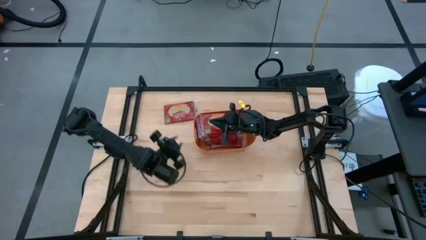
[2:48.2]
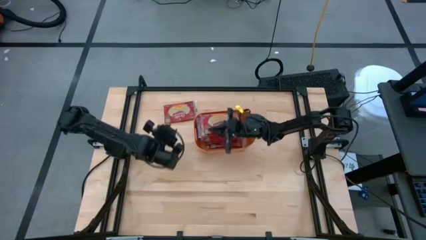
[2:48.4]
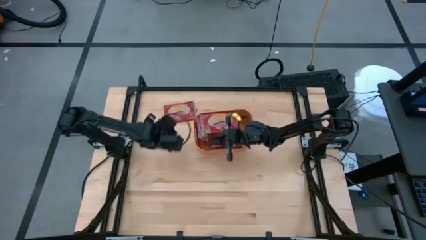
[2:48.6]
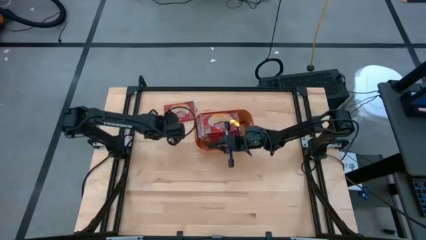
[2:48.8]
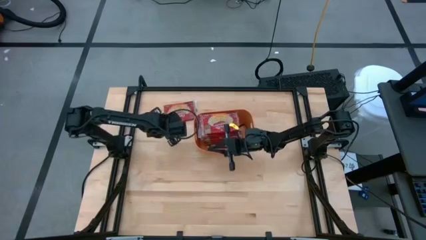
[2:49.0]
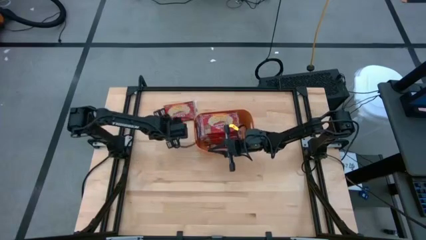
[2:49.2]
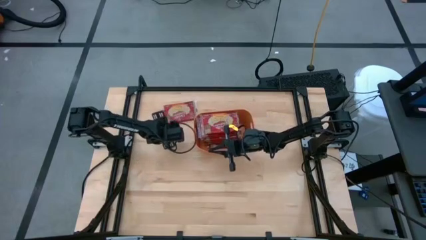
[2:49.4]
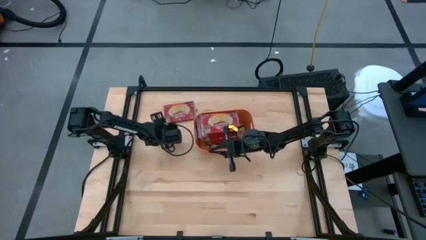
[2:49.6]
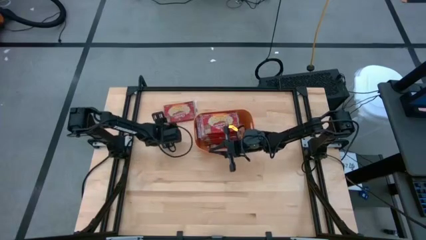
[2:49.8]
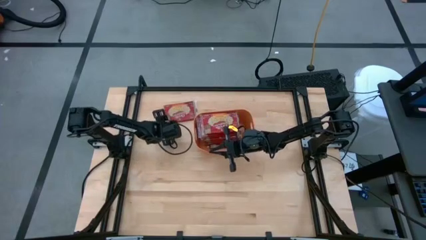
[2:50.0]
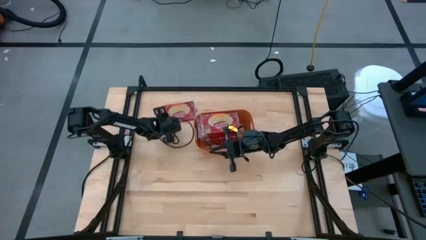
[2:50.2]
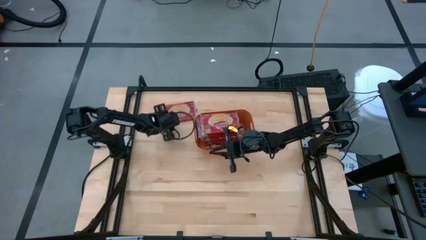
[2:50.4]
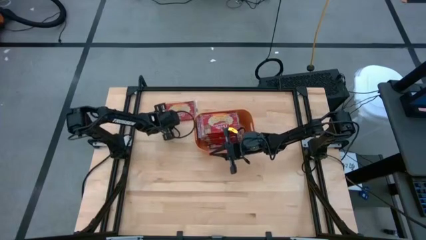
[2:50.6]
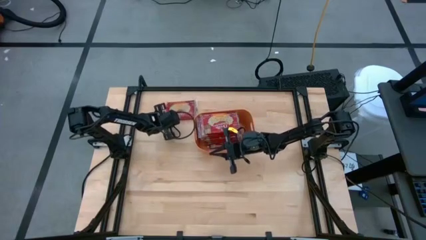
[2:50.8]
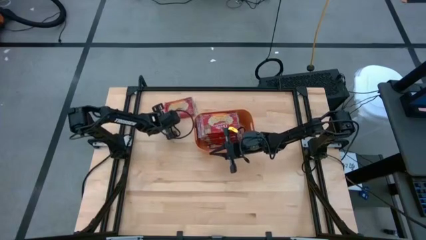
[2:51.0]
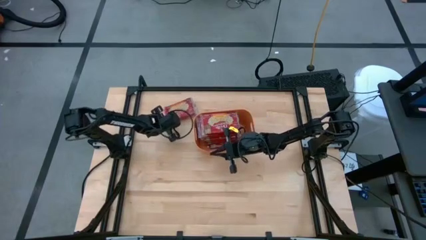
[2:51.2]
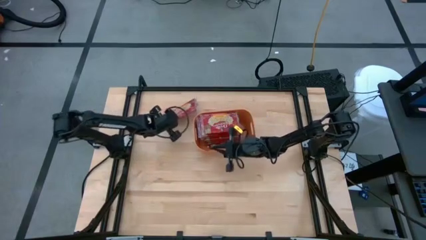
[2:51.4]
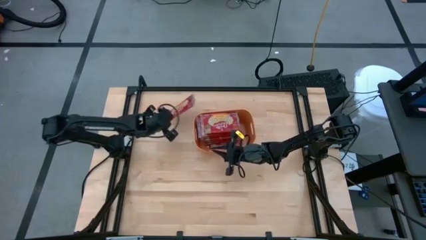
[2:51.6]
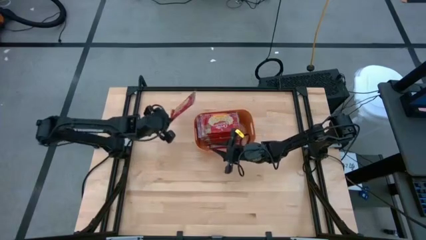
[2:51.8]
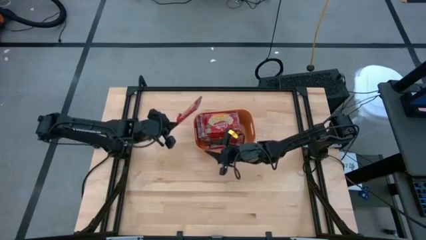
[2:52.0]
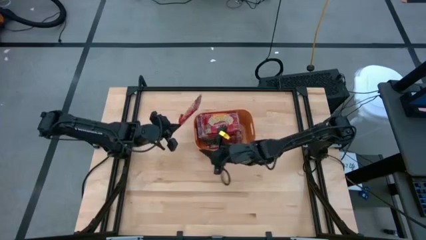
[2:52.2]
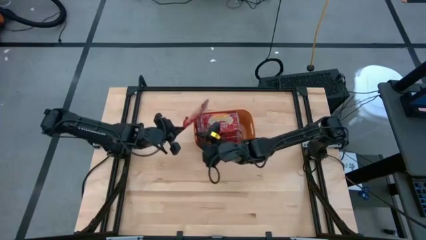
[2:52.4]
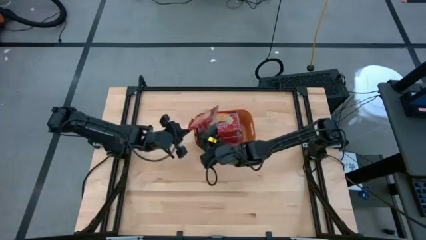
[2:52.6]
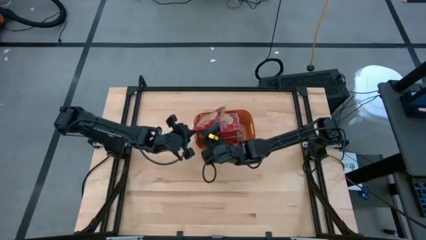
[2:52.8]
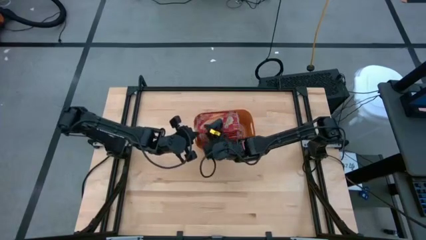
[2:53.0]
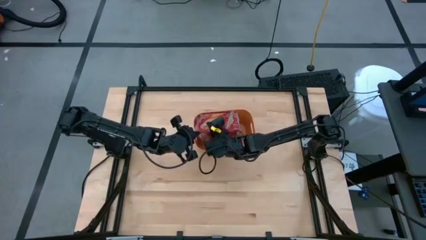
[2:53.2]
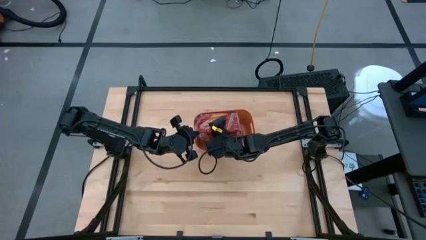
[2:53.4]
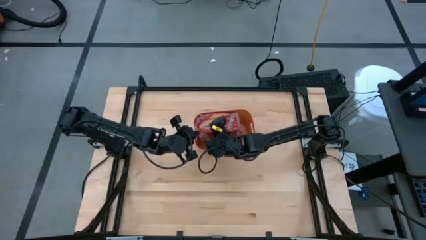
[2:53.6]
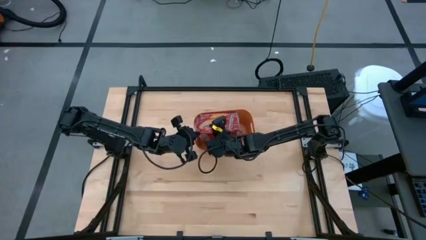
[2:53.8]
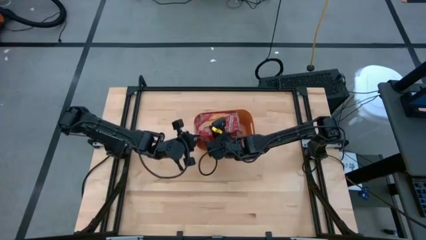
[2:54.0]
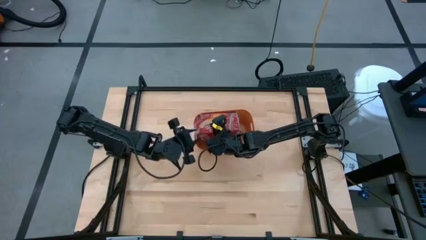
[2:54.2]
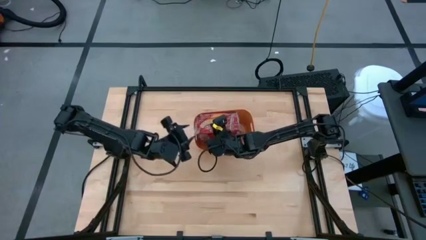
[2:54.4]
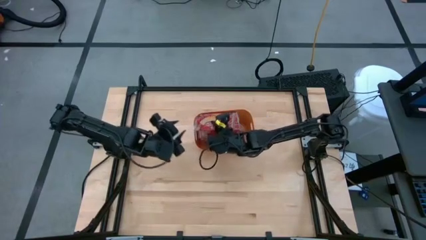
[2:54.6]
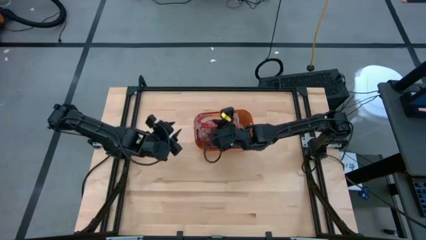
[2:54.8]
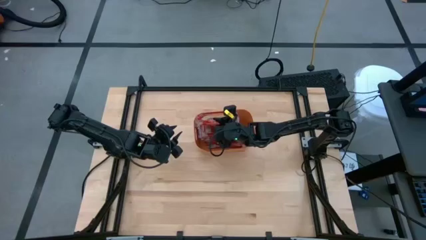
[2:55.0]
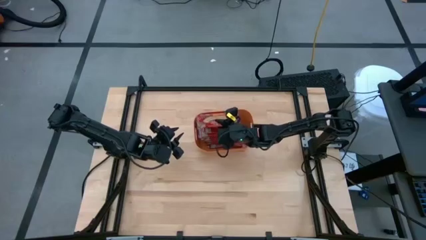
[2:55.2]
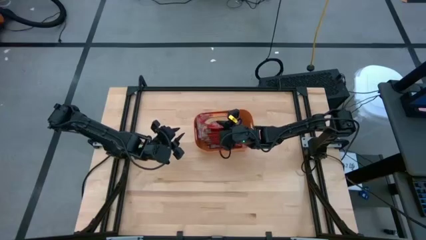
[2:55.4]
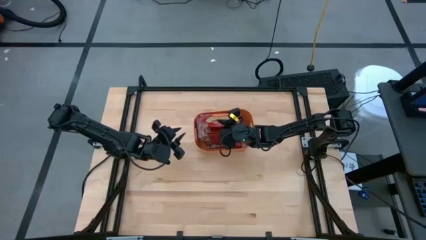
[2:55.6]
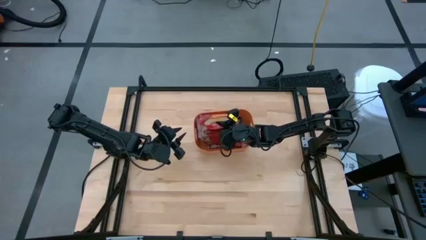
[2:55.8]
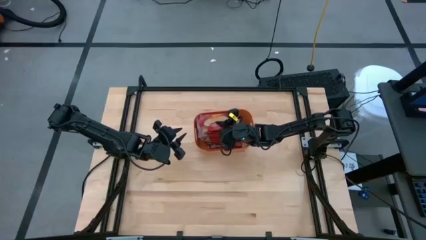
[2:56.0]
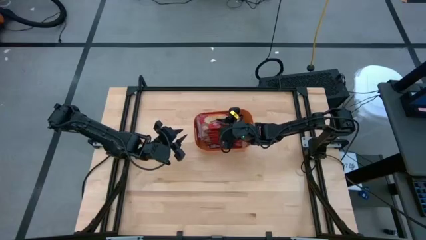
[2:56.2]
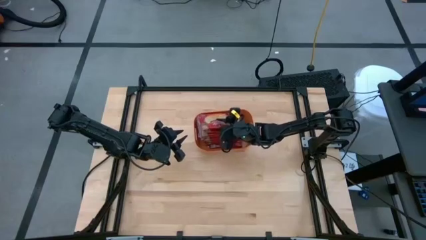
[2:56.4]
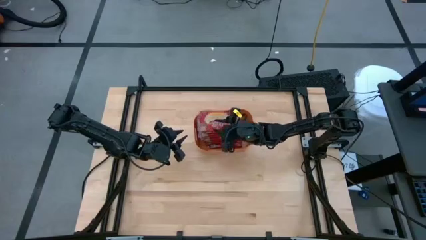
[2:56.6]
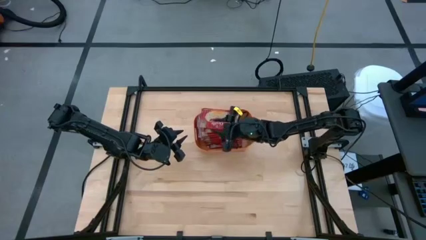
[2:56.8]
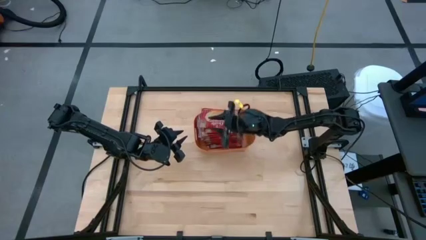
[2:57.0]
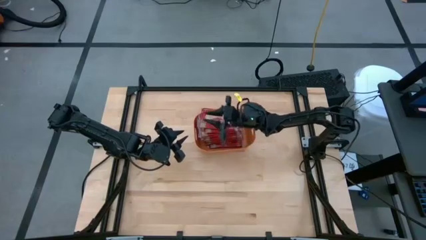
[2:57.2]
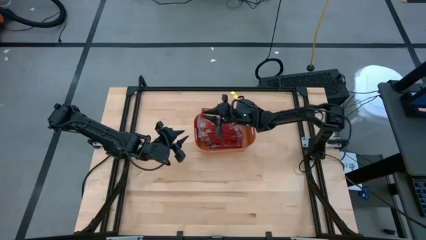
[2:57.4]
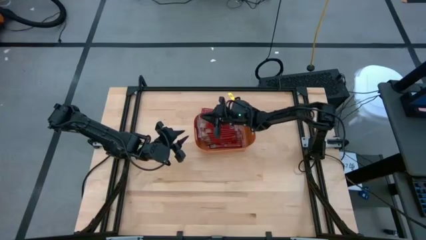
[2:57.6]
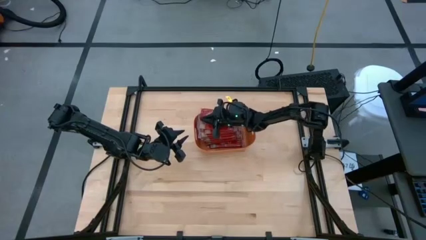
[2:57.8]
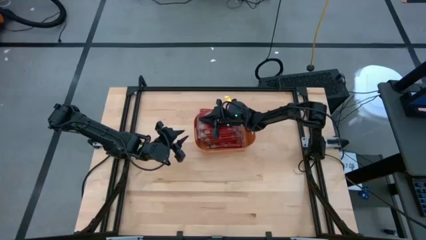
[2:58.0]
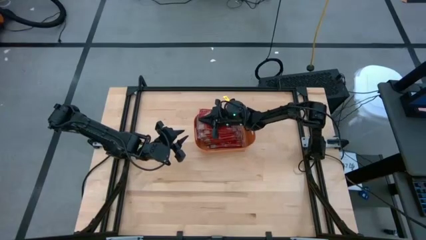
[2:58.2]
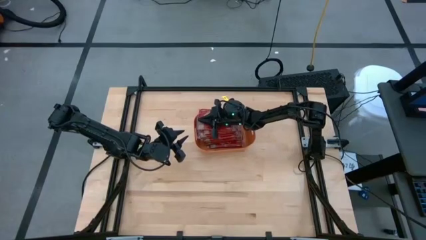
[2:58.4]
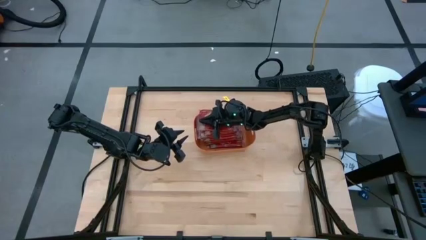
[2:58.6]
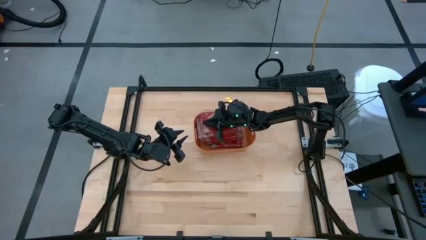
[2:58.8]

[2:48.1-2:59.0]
Task: Sort popcorn bags into baskets
Put the red popcorn bag into the orange bin

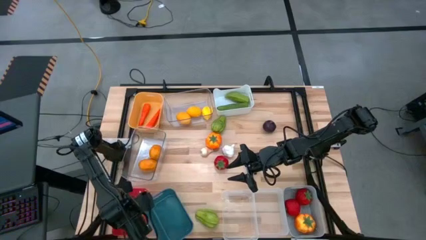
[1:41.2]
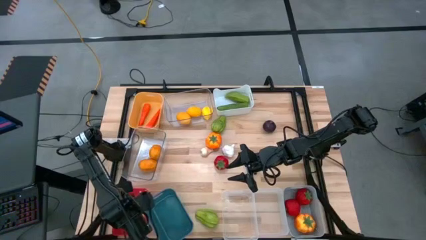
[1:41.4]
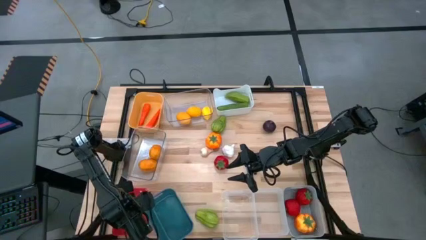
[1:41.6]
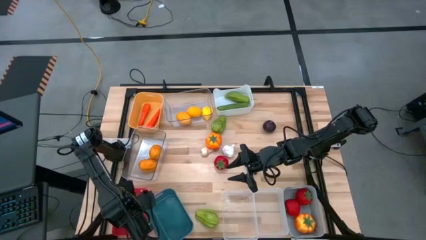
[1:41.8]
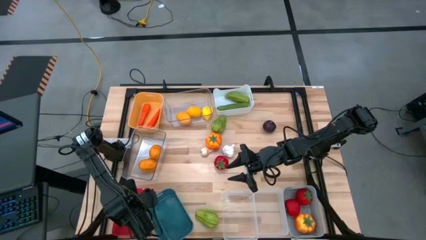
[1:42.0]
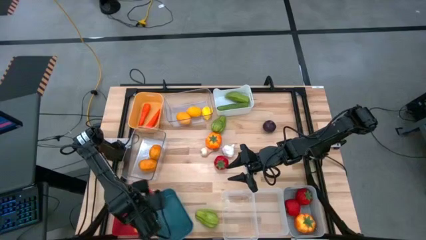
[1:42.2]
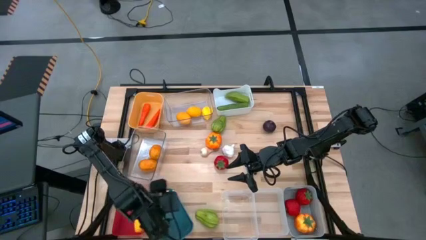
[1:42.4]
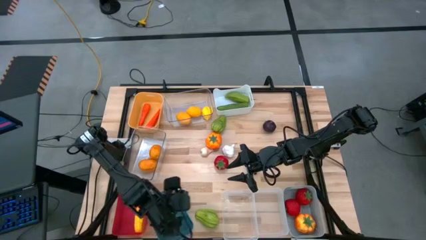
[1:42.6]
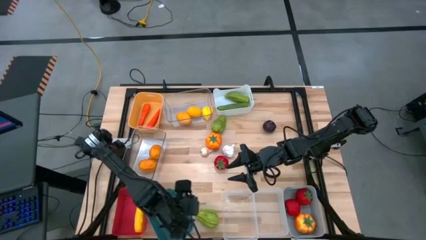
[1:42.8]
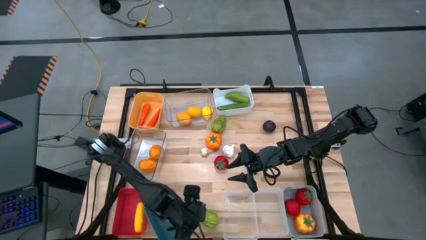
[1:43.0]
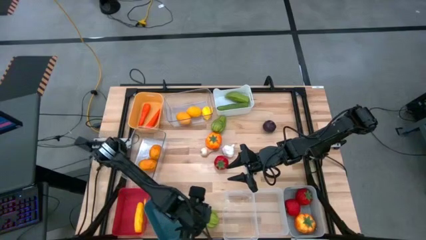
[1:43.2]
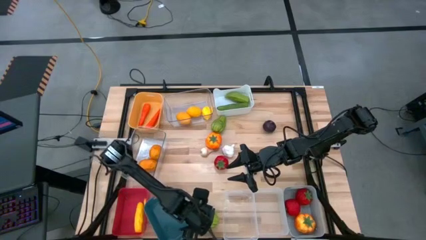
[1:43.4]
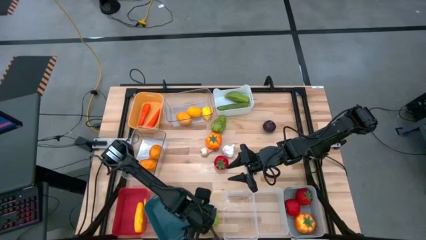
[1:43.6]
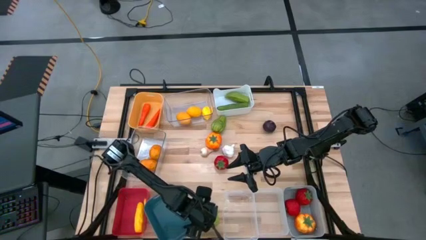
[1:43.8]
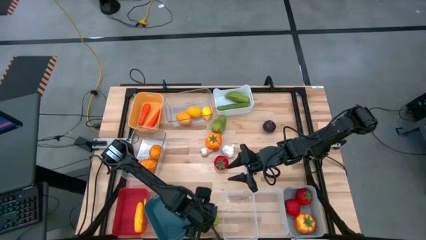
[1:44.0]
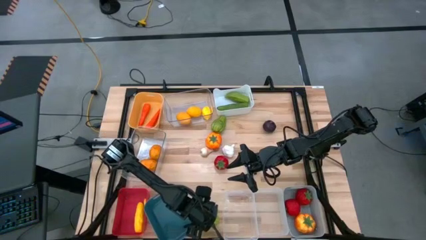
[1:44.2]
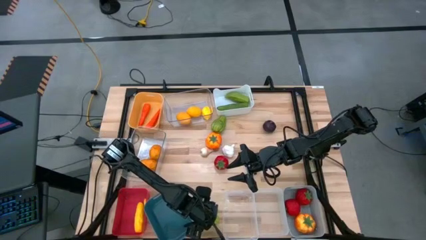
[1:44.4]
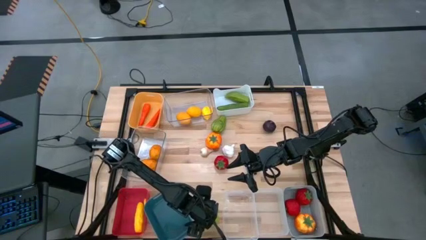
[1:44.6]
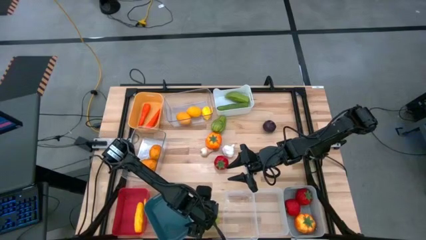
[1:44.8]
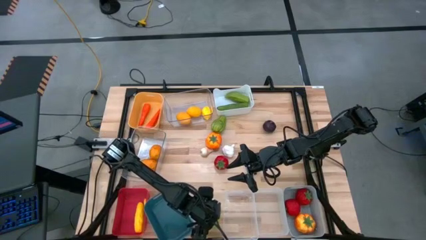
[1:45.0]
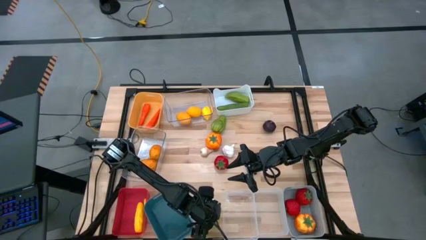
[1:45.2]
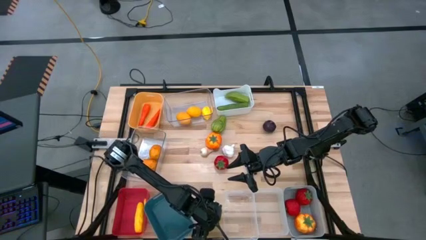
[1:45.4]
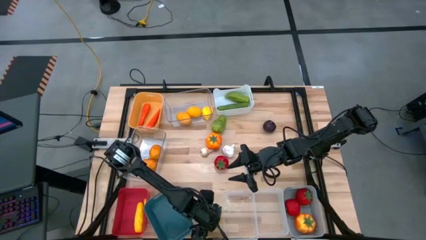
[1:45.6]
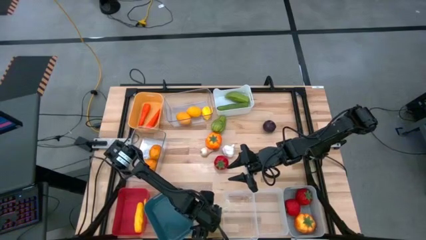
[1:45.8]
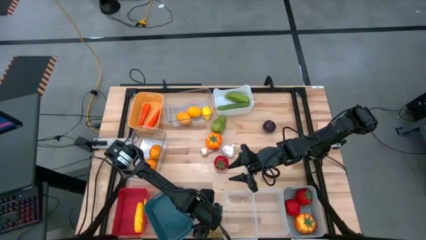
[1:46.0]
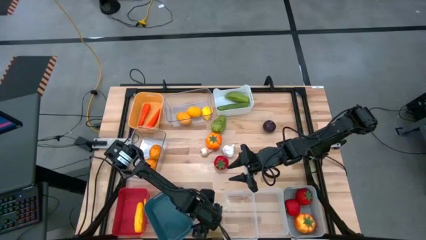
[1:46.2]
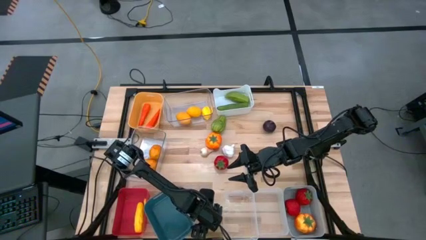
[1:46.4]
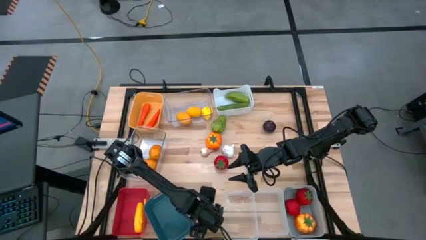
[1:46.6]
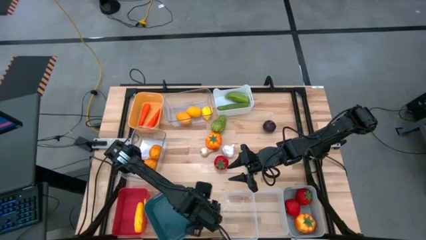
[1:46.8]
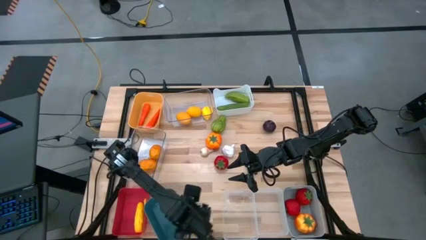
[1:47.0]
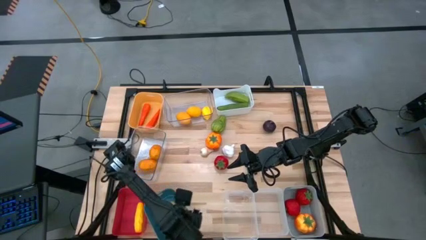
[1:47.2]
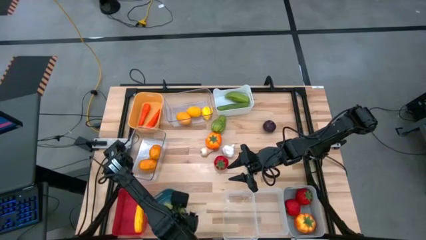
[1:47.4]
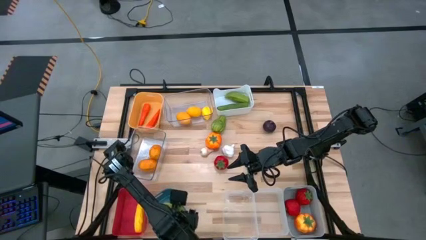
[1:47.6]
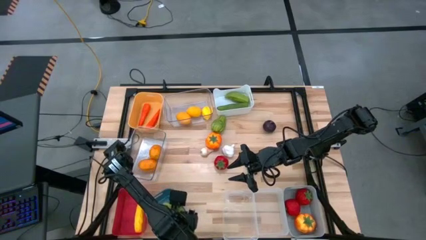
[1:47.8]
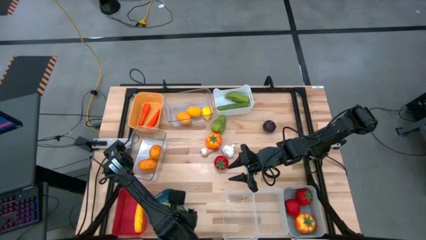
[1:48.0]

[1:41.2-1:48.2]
Task: Sort produce into baskets
Put the bottom green chayote into the blue bin
